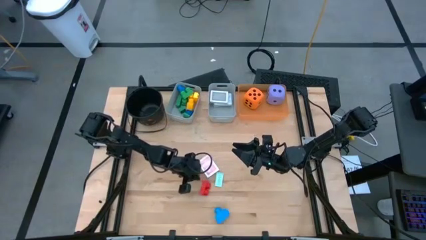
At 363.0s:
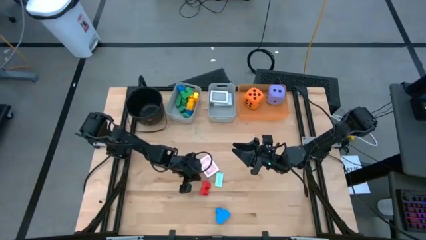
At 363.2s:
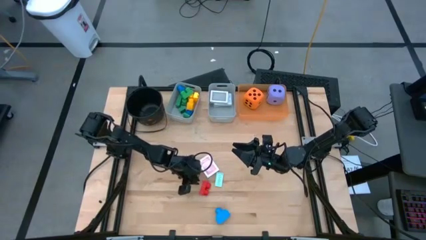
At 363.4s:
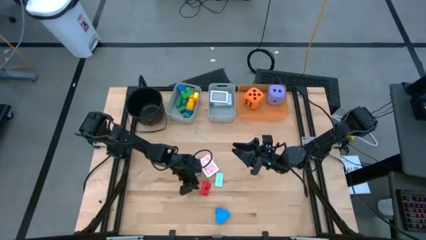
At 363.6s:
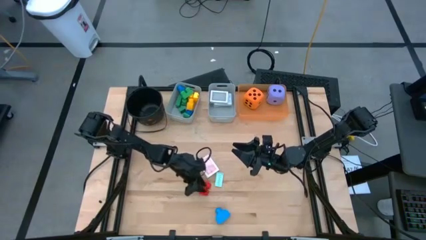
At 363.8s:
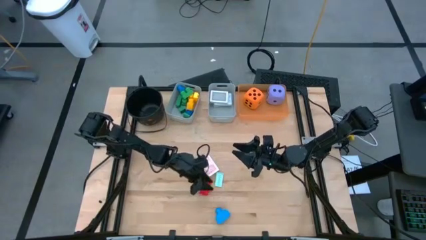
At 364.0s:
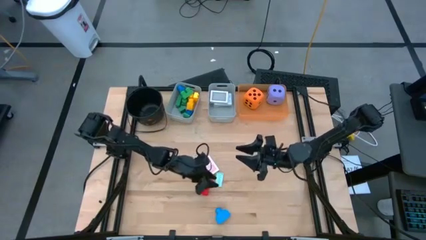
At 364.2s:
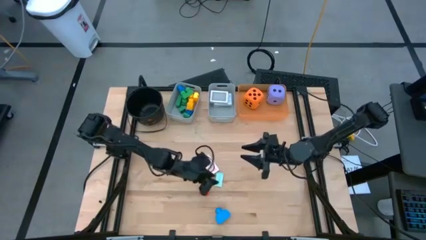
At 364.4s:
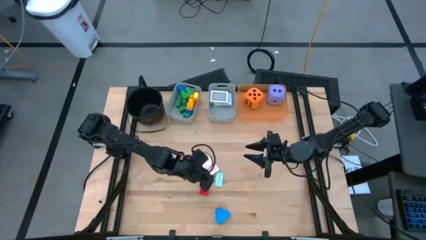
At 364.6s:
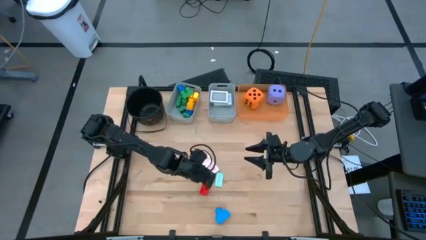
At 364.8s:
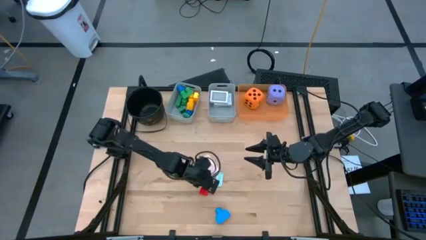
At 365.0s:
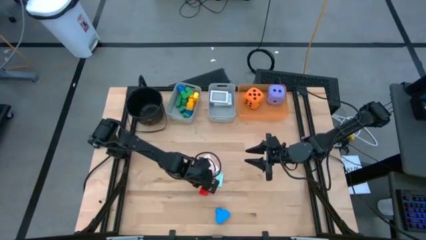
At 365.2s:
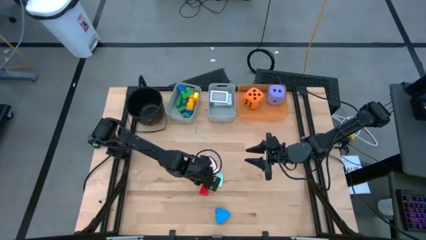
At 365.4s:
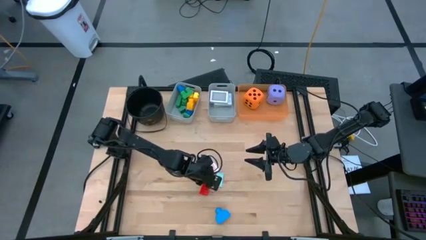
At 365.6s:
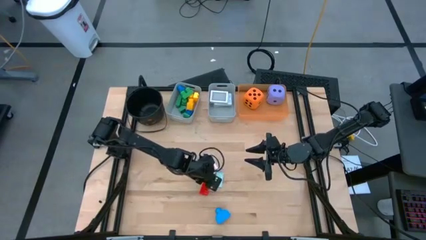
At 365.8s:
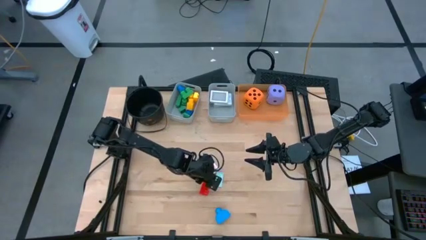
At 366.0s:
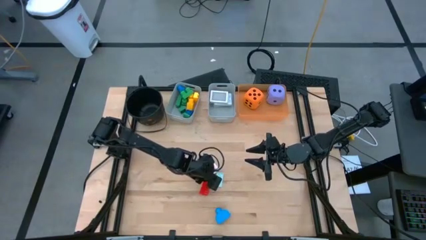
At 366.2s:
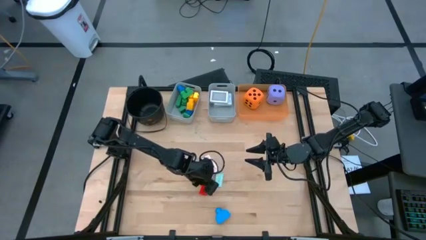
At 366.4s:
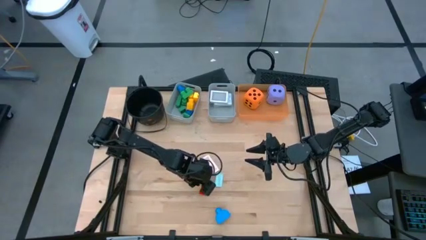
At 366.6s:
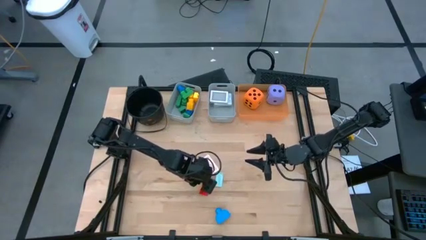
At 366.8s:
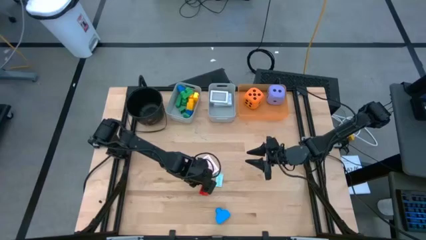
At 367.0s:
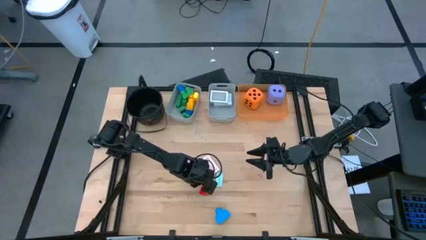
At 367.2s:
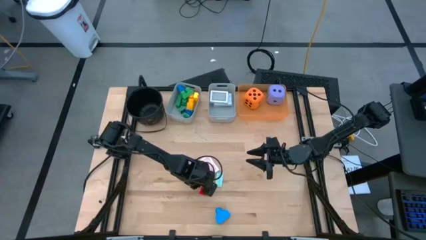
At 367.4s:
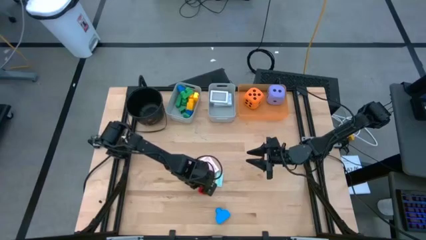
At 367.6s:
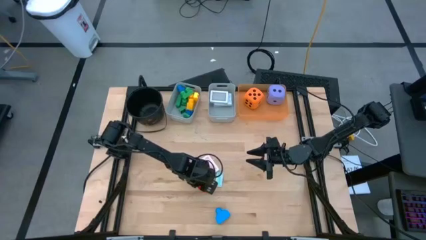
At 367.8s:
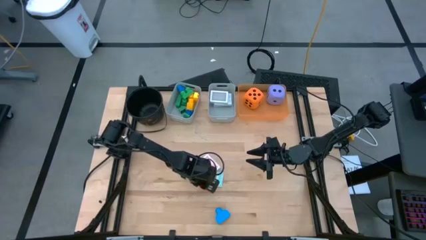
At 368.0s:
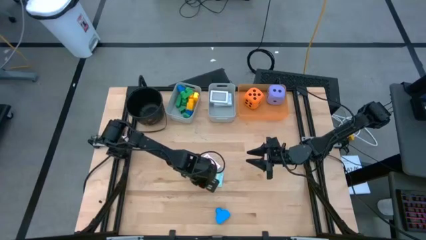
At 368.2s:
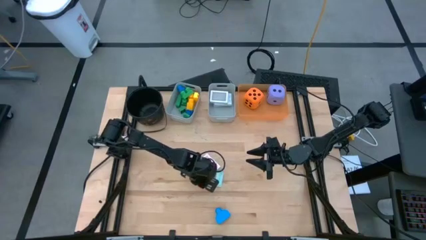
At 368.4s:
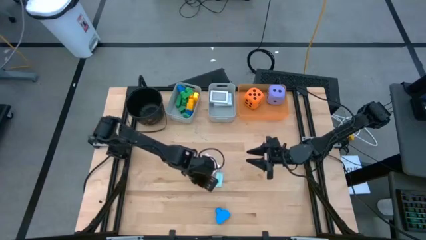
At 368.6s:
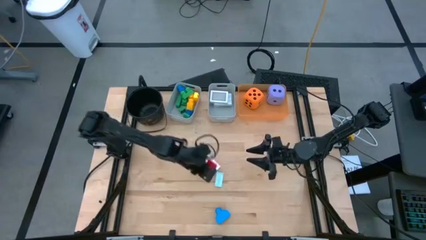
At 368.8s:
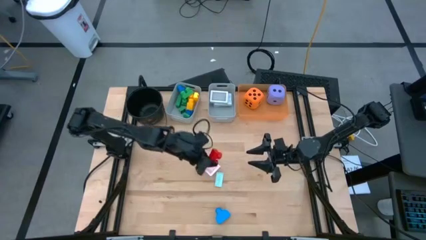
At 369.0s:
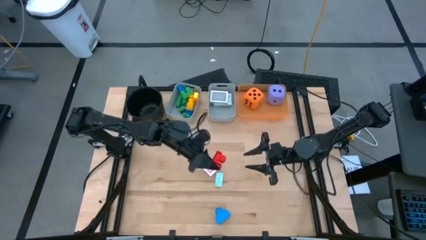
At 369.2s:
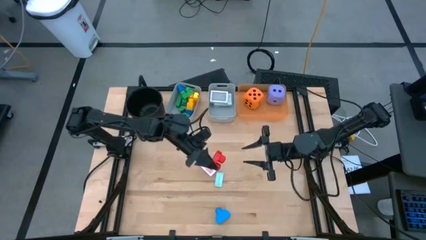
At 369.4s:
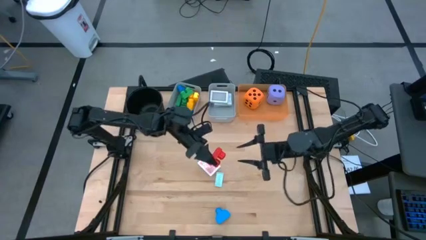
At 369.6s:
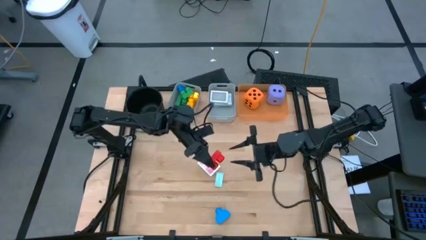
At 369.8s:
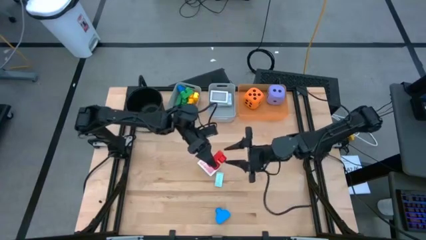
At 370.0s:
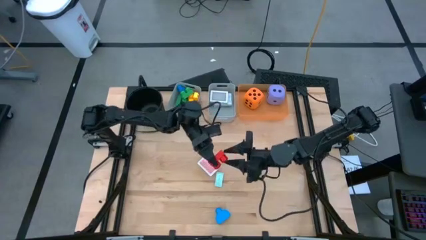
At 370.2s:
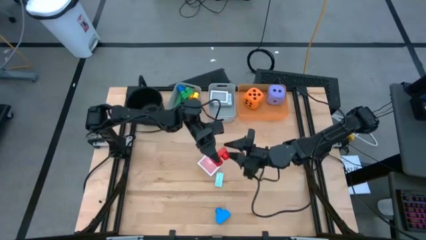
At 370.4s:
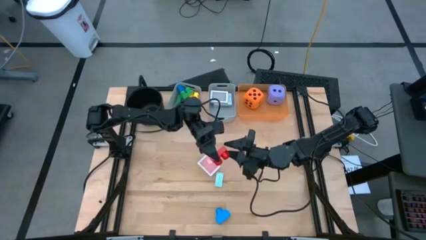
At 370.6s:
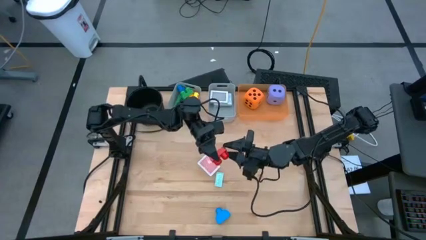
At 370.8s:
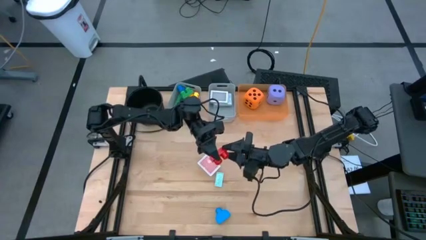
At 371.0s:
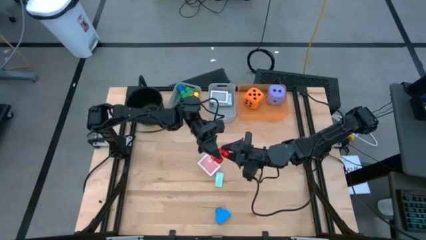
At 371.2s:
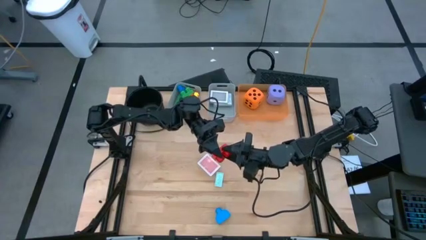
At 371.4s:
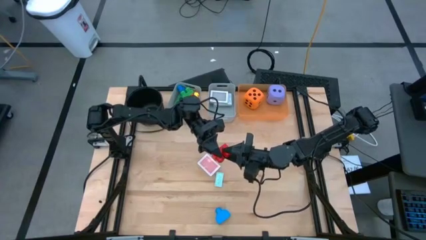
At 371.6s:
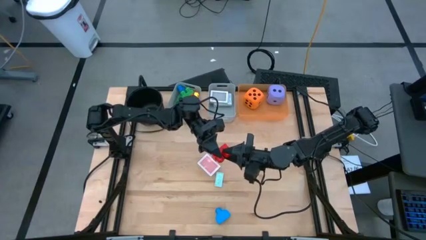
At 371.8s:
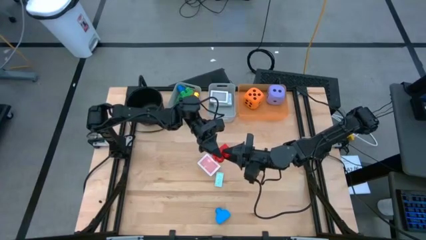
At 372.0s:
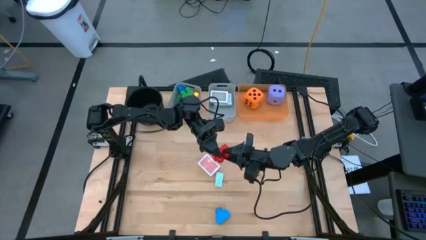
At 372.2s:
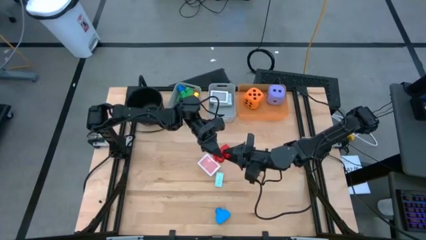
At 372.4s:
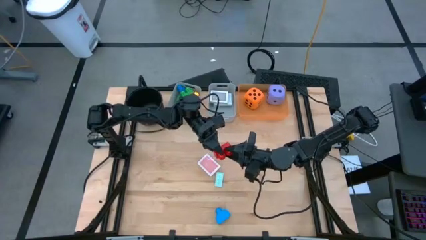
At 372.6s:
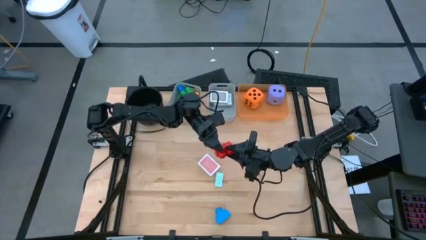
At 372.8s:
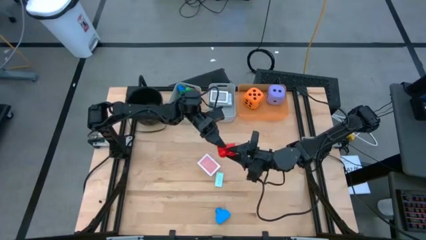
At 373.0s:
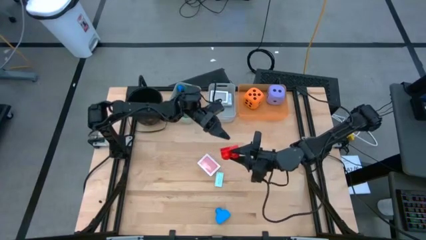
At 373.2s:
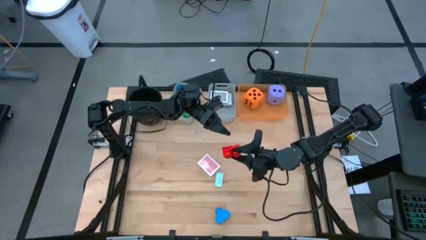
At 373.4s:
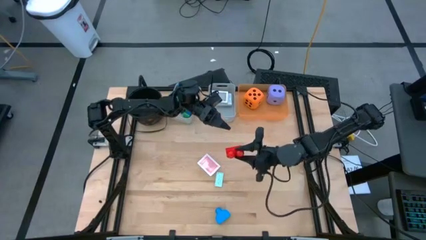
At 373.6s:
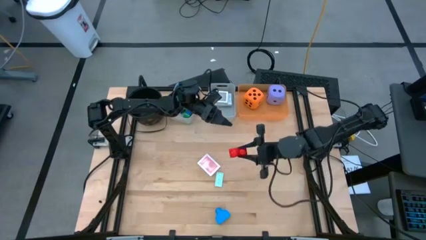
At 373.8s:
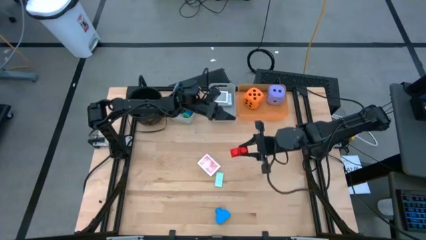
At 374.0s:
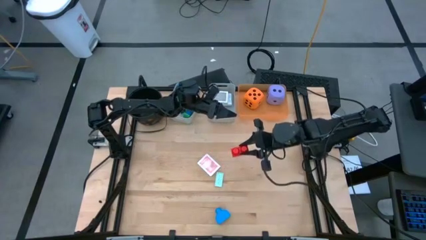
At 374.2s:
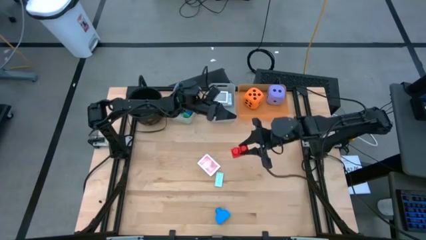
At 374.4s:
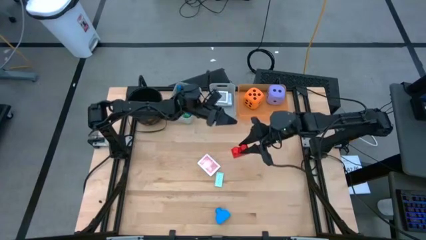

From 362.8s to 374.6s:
Task: Pick & Place Toys
Put the red game piece into the left gray bin
